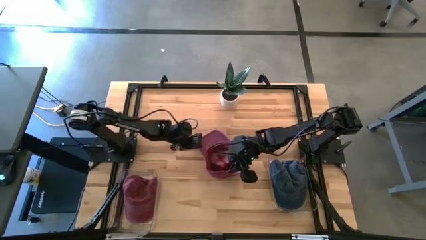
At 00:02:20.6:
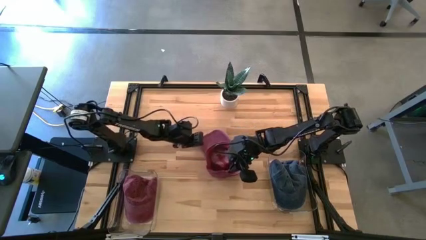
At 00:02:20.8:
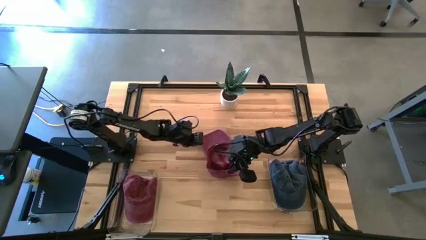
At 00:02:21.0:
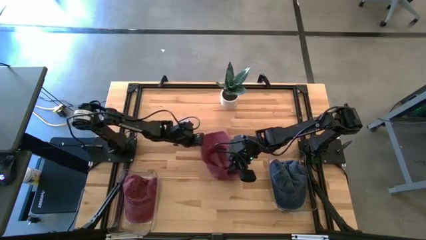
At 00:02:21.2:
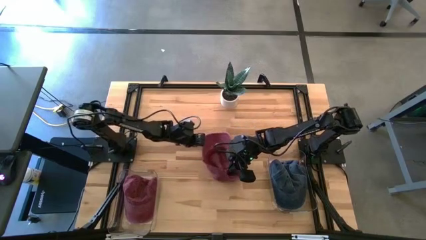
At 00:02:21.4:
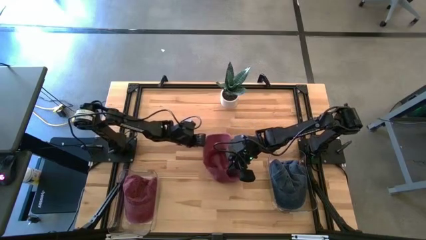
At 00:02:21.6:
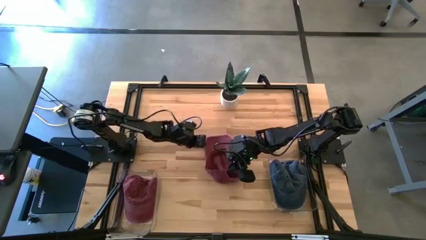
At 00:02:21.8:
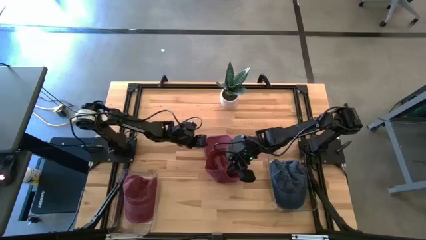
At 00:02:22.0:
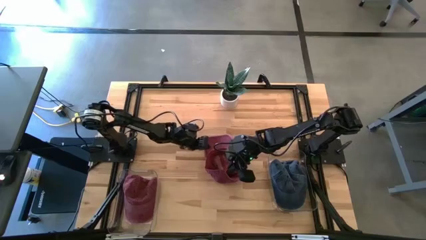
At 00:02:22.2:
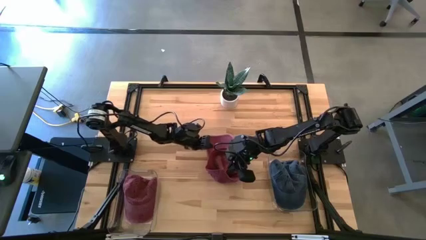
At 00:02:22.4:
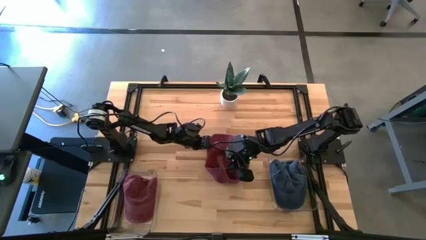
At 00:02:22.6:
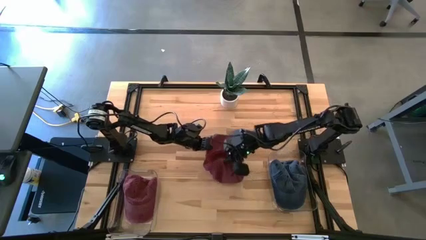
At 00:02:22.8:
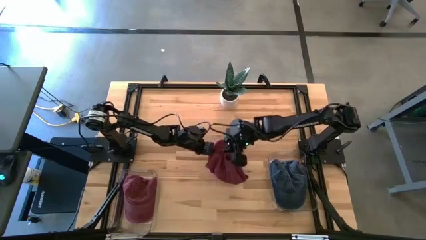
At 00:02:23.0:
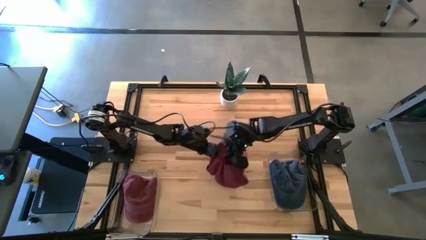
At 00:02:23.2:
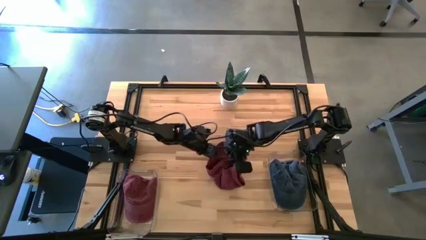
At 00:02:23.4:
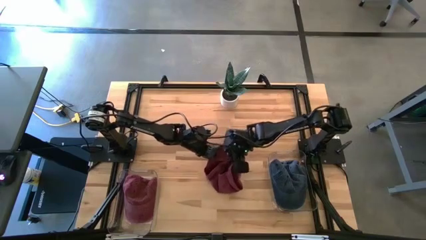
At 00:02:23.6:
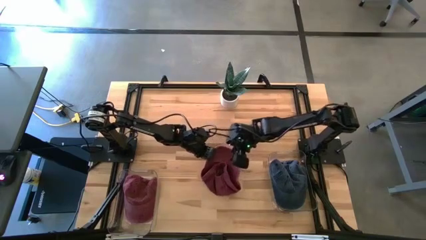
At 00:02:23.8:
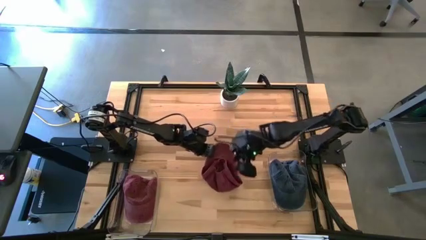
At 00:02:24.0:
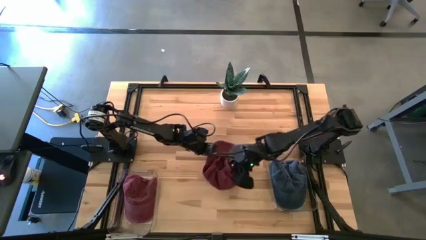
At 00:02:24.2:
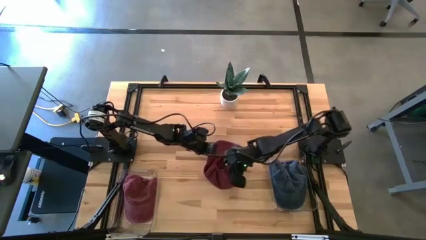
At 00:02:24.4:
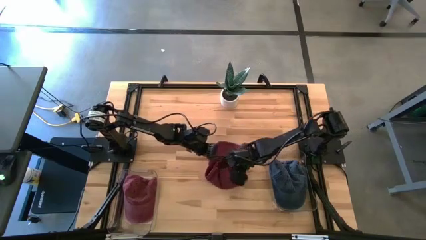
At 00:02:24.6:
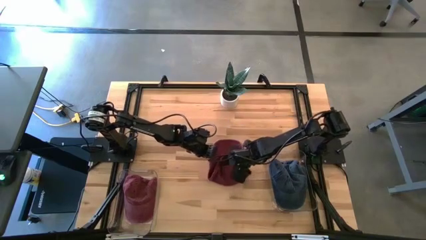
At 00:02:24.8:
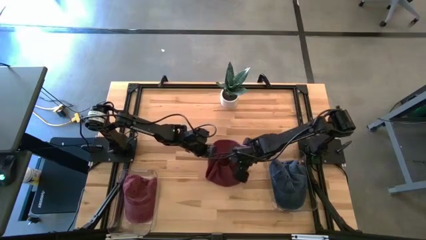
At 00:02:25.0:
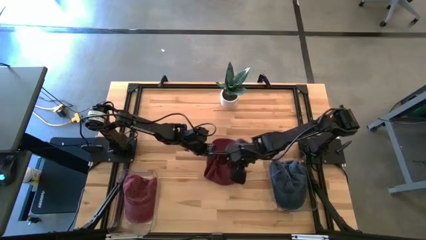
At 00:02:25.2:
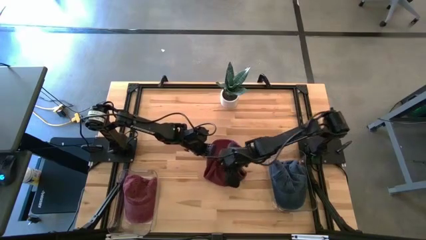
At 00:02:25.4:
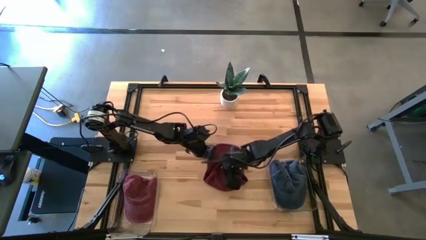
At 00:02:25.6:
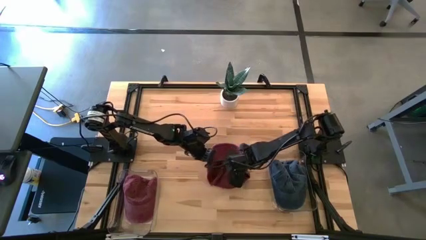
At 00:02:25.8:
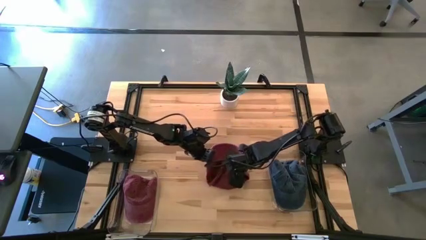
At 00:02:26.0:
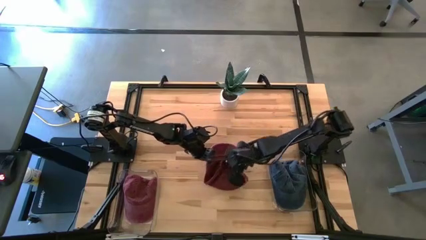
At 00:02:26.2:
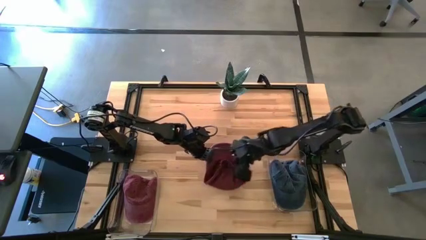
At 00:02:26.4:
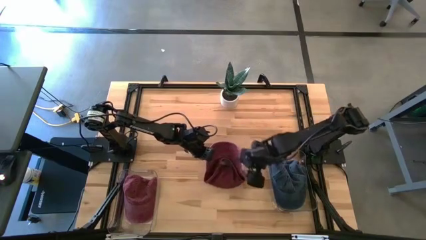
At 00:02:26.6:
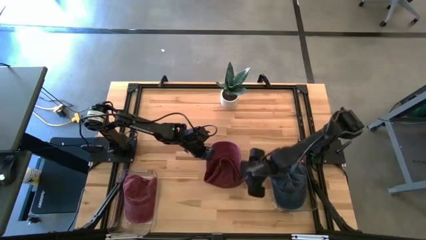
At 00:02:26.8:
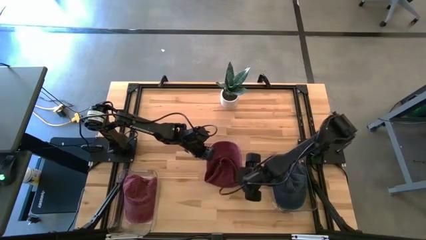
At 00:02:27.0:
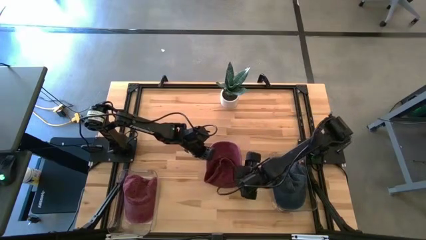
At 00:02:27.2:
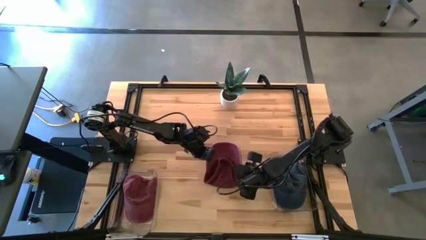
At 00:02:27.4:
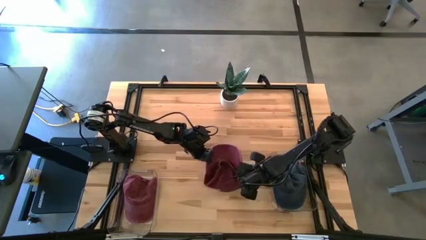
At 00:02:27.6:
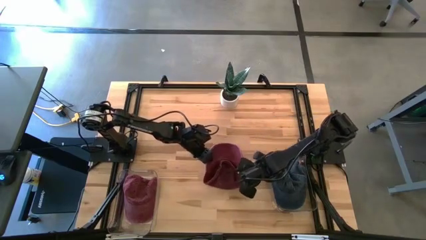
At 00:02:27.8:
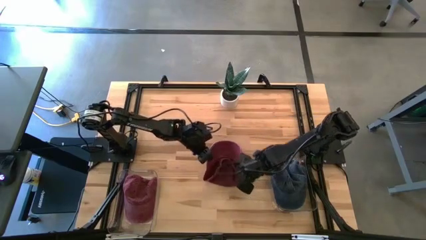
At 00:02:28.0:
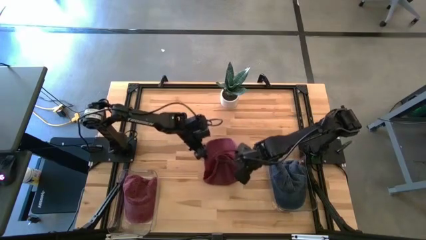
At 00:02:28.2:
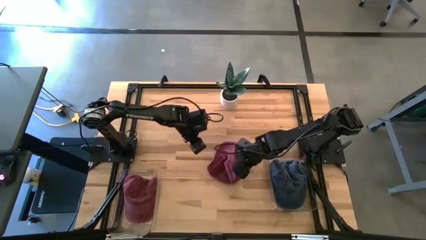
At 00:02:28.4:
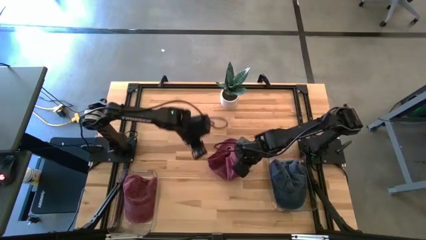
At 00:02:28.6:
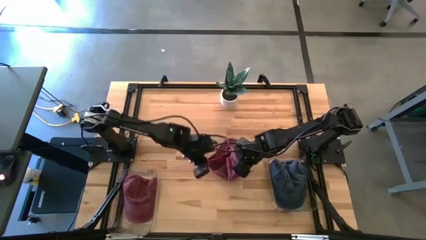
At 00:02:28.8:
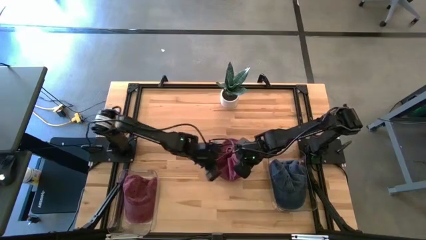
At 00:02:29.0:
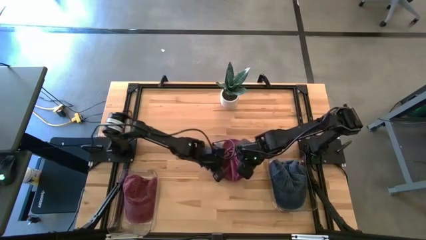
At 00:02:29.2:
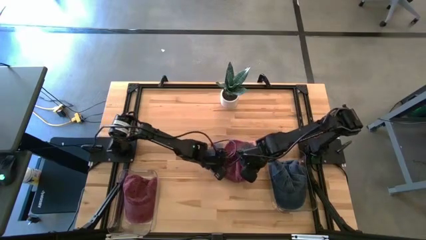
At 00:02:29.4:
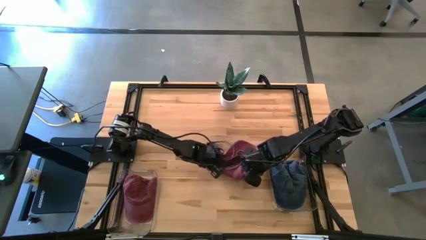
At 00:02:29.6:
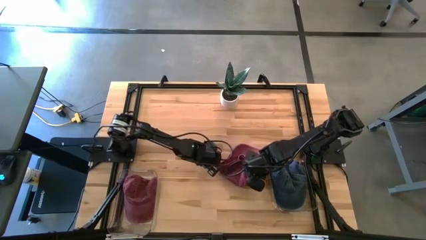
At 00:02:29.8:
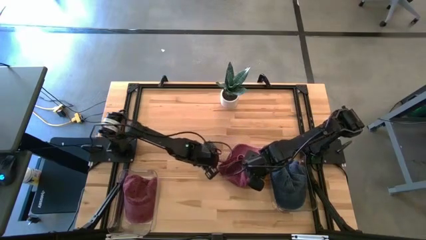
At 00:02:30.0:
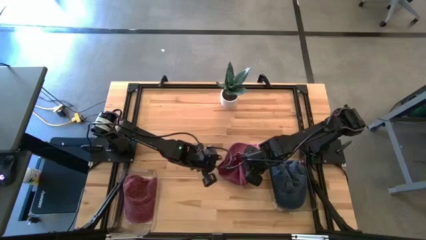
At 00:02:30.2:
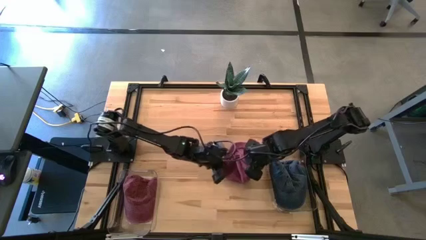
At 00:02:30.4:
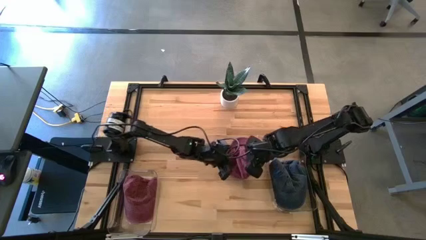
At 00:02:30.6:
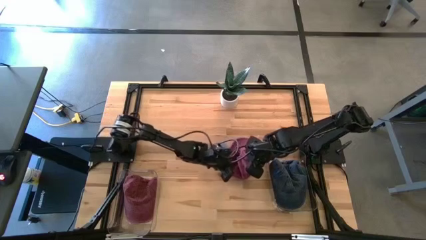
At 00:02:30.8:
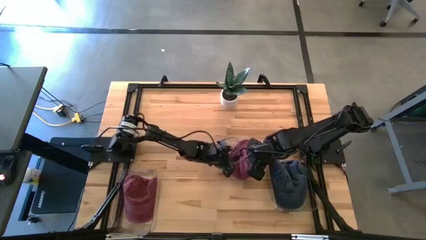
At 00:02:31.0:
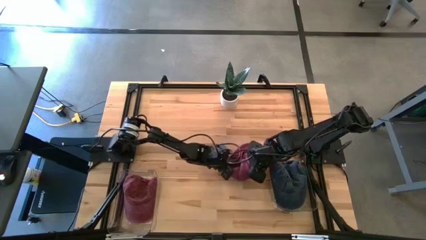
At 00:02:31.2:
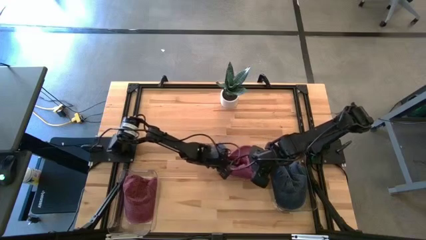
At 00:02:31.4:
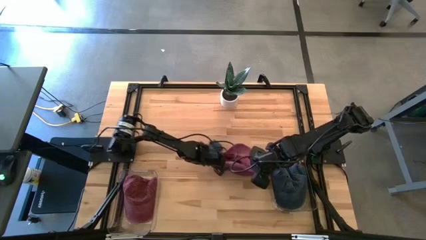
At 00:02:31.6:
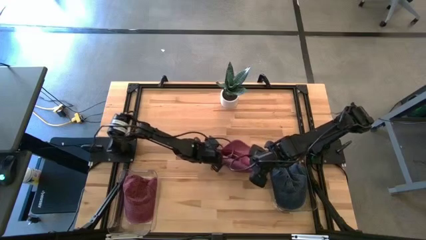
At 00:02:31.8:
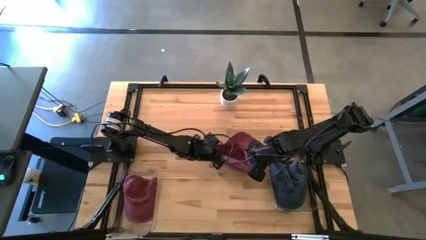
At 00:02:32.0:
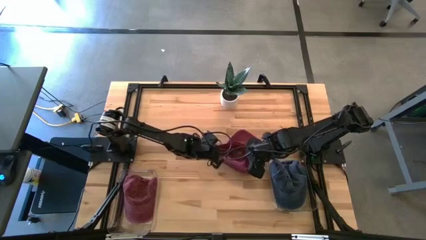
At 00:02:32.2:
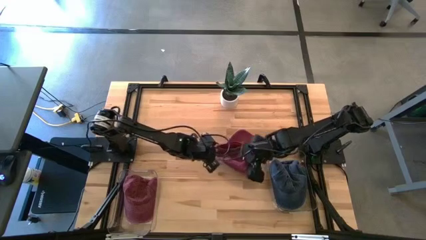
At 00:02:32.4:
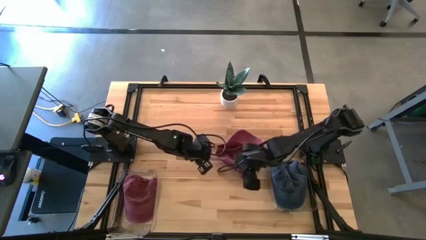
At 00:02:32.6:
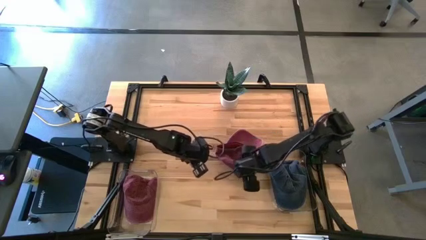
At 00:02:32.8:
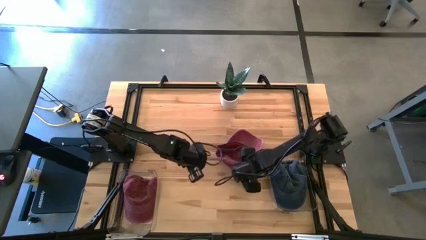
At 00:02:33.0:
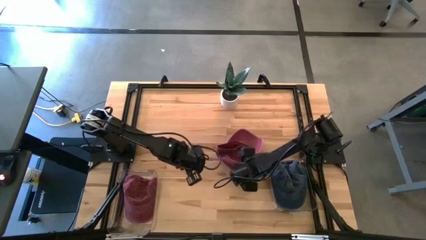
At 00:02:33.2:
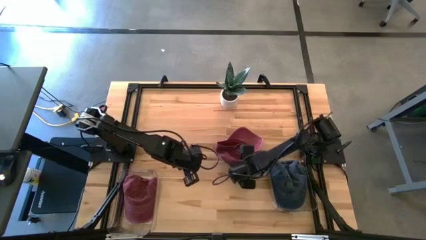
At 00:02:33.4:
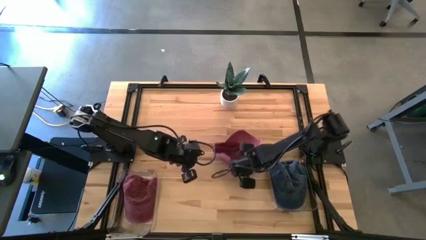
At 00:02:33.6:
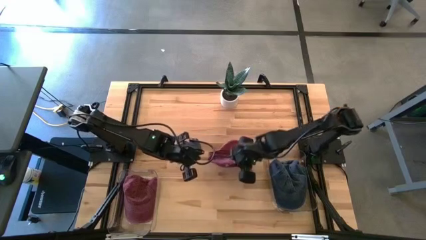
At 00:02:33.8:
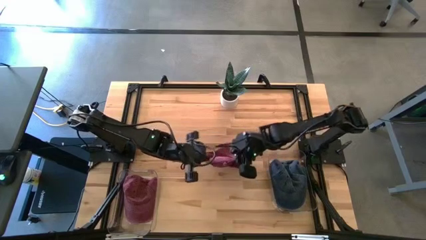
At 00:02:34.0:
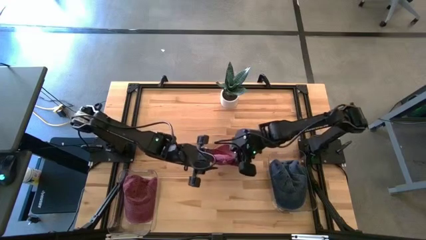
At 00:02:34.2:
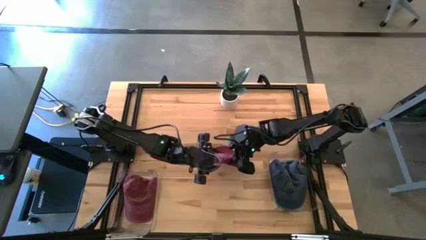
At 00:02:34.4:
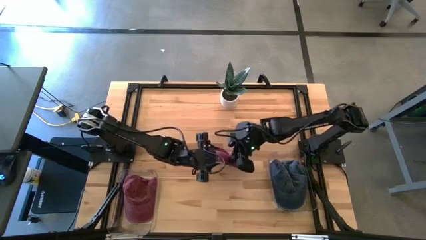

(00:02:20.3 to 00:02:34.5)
Task: Pick & Place hat
Put the red cap into the left transparent bin
